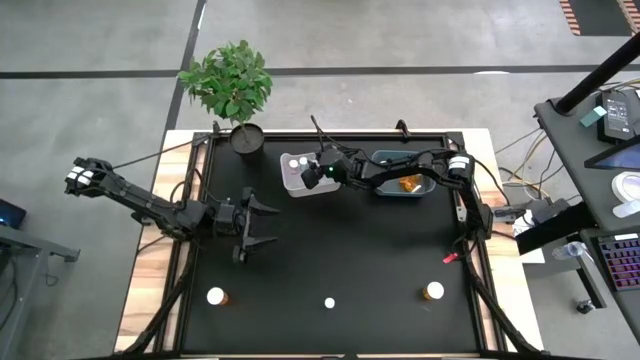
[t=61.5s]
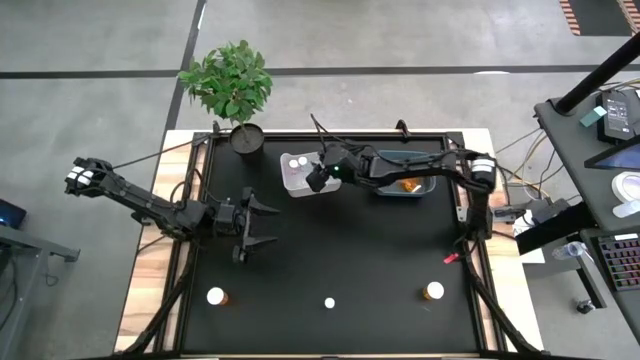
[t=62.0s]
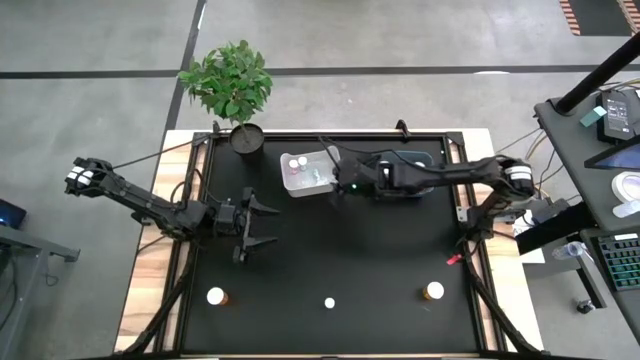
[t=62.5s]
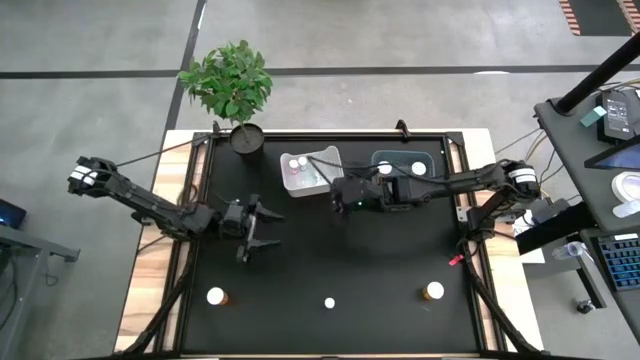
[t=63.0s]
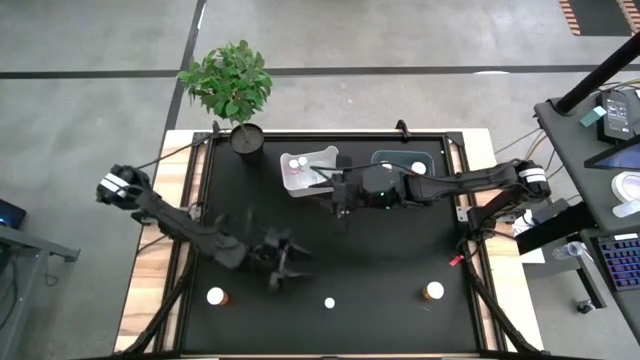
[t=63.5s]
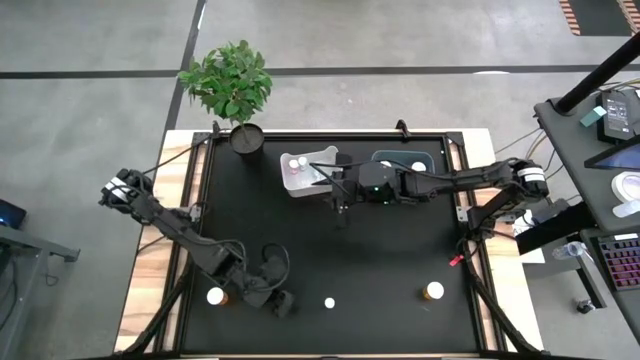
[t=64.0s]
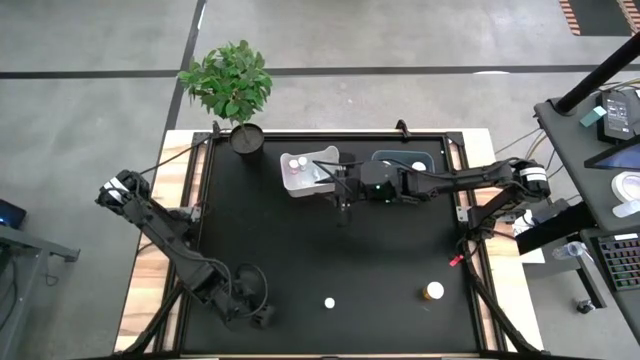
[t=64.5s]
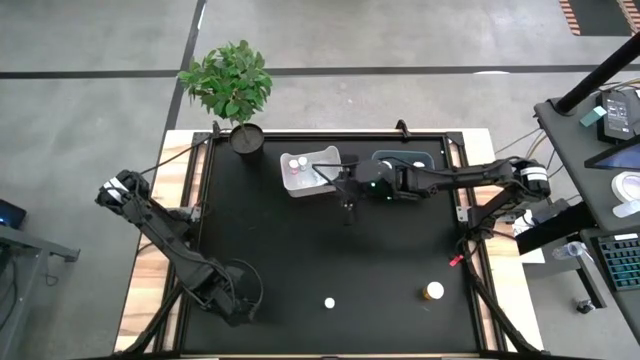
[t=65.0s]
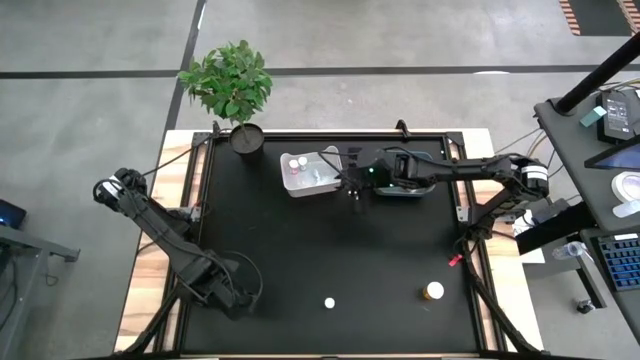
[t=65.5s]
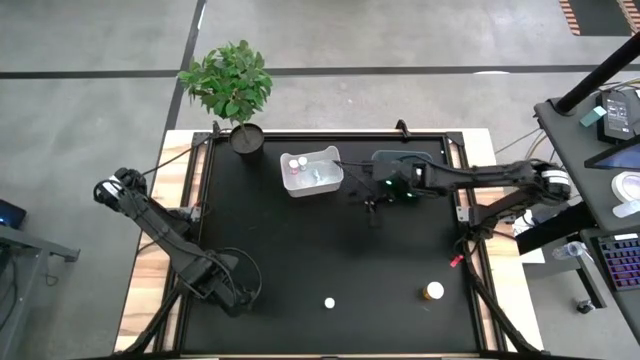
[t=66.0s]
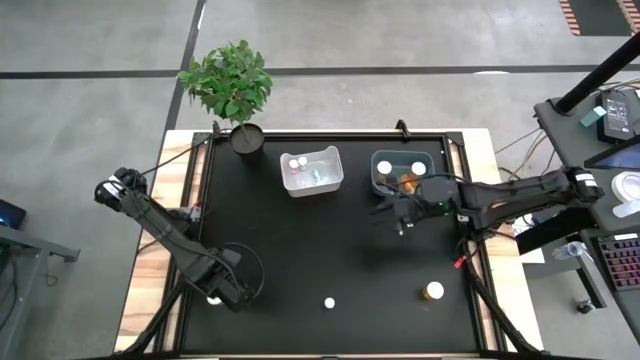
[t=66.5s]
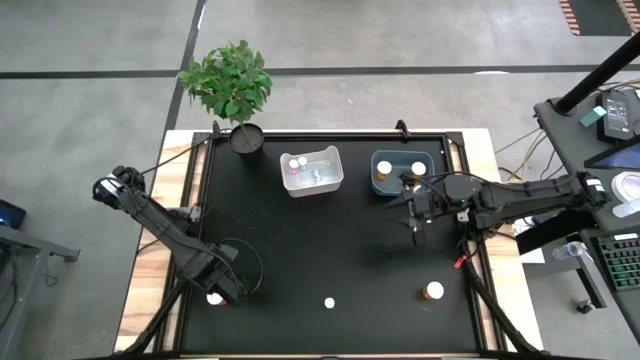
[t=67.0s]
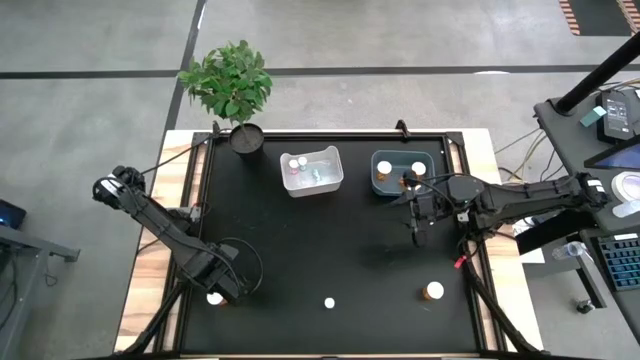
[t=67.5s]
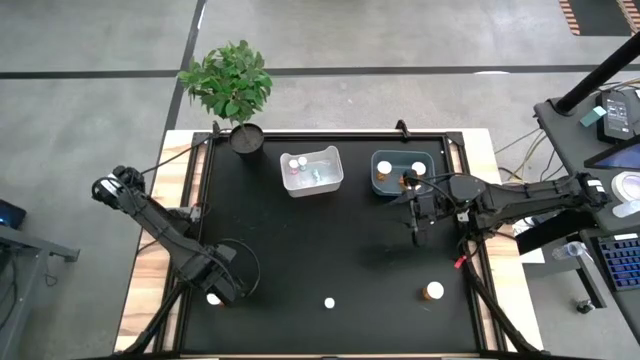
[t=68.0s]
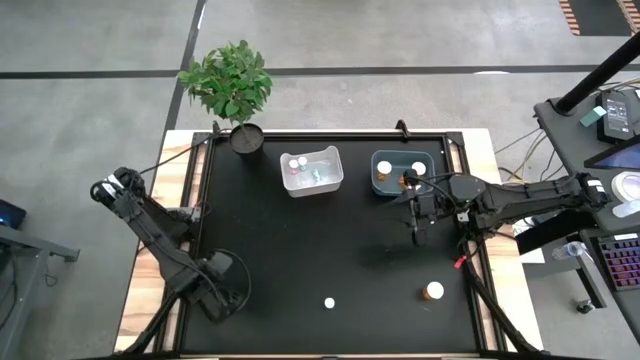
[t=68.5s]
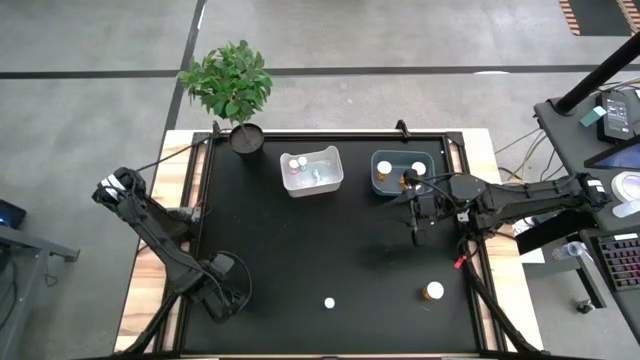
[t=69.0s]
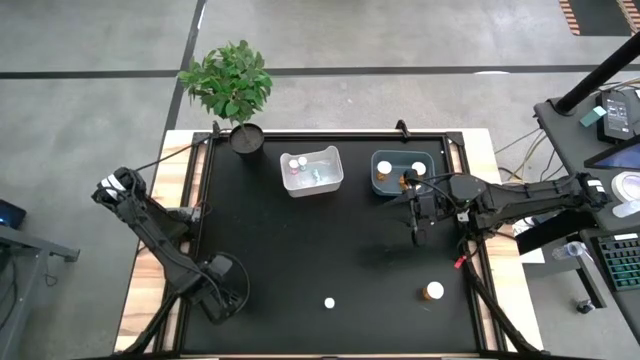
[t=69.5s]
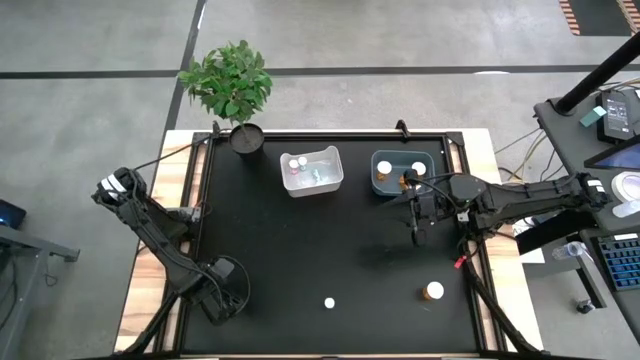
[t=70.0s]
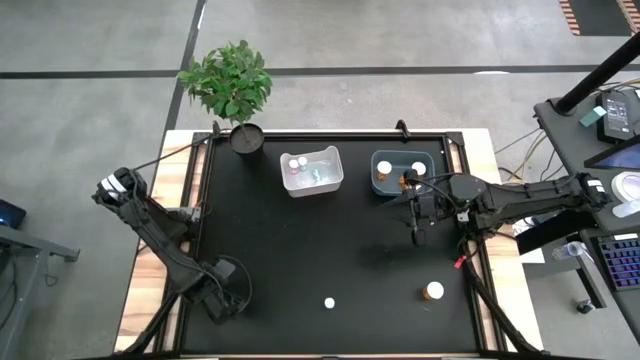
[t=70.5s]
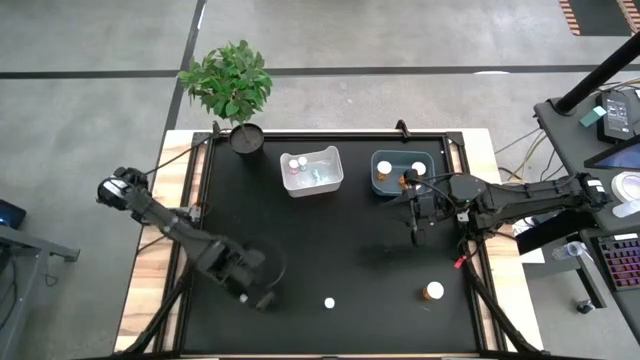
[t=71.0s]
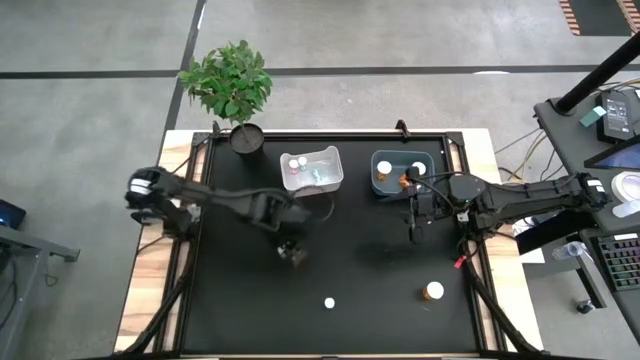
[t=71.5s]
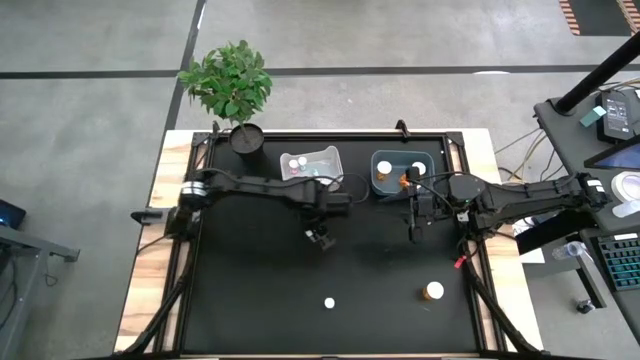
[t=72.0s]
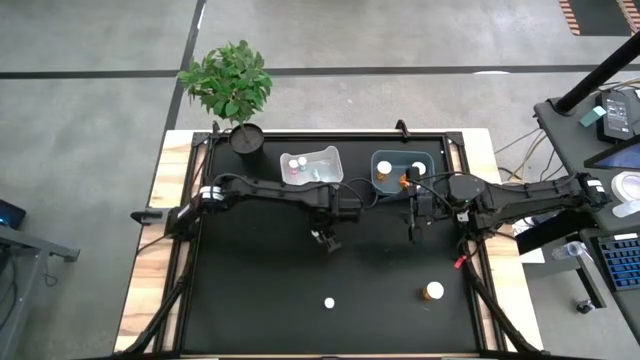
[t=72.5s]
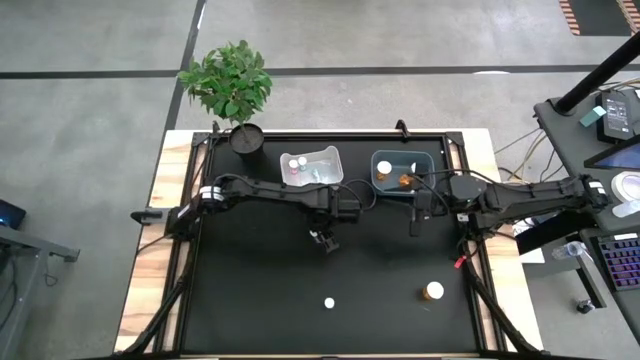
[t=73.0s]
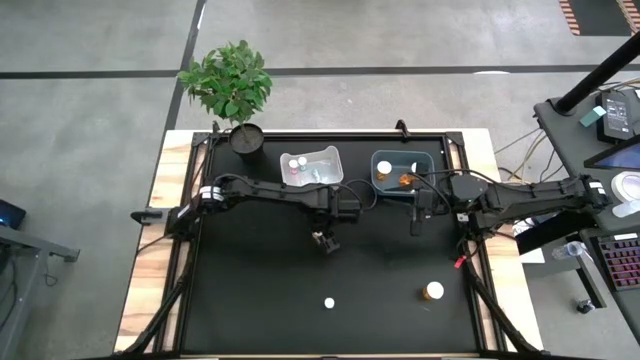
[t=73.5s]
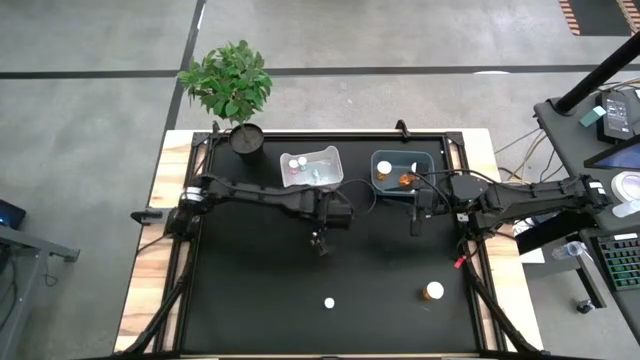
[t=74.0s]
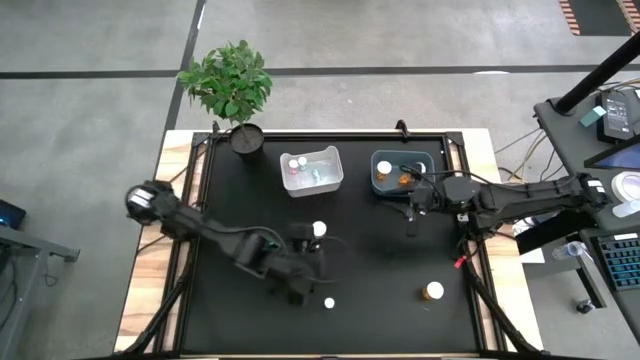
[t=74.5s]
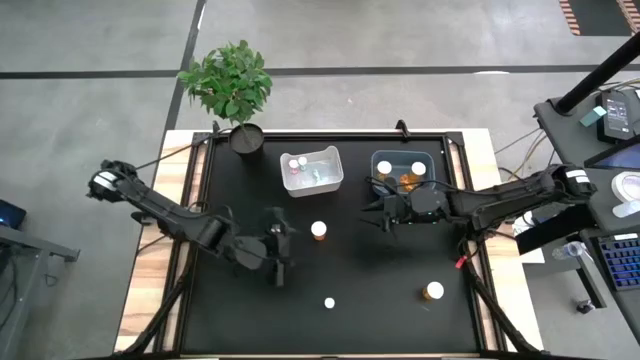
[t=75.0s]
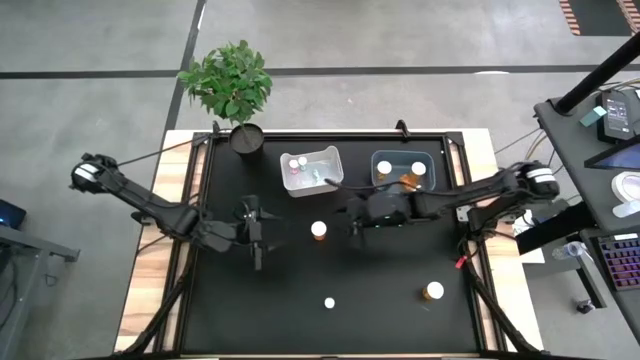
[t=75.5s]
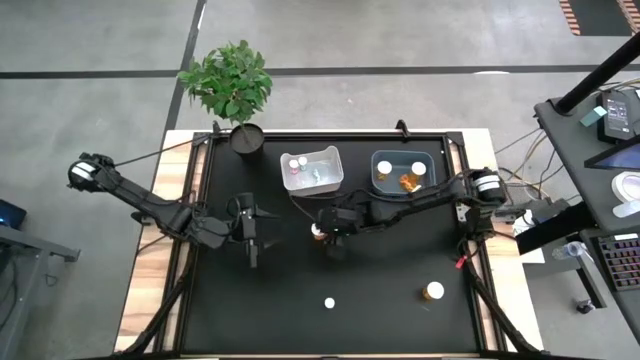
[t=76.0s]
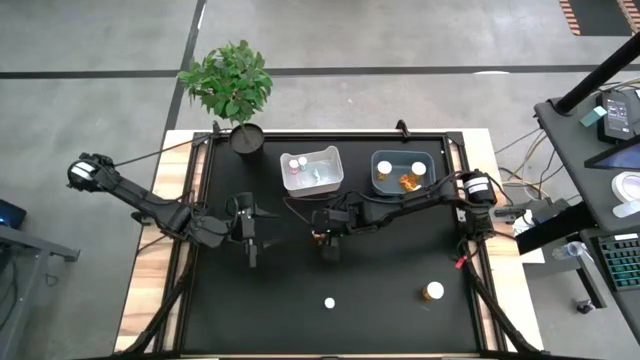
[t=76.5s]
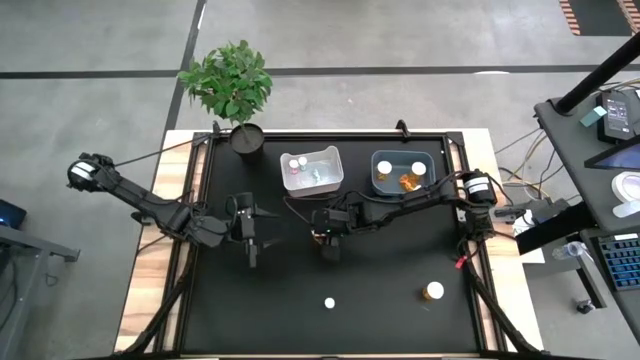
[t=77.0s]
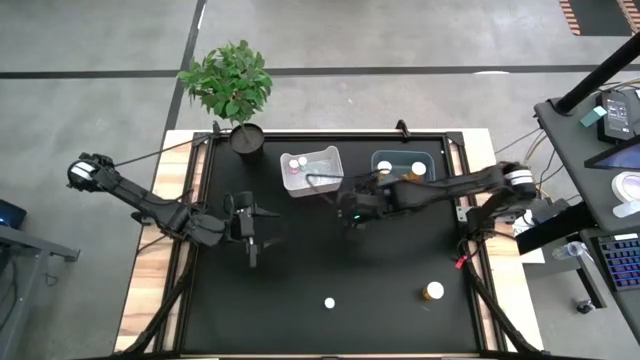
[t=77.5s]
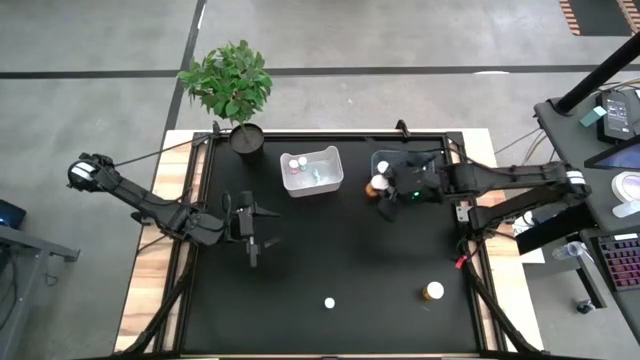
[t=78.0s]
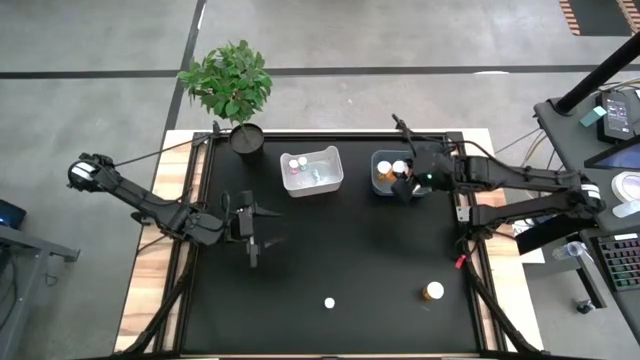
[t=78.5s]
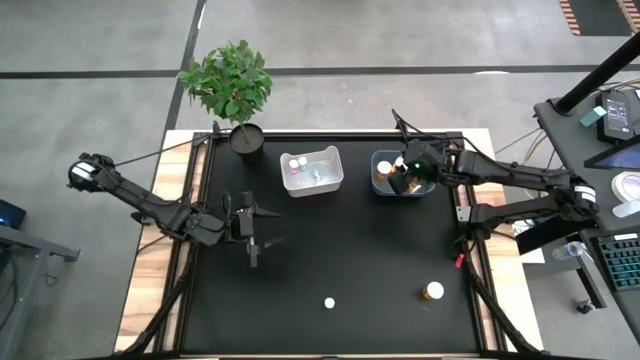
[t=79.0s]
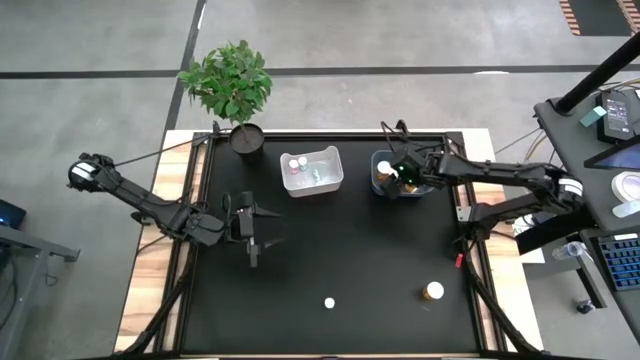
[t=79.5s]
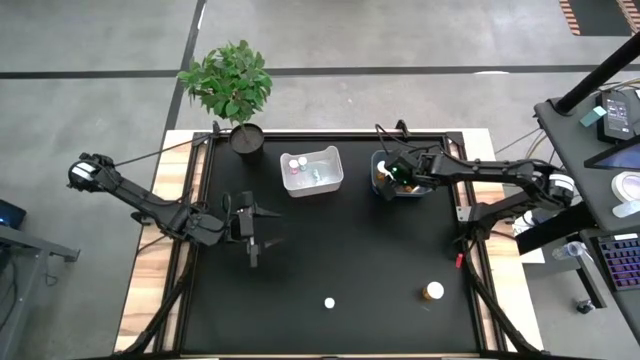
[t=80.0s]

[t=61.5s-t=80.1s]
Task: Pick and place medicine bottles into bin by pill shape (circle, oval)
Put the orange capsule bottle into the blue bin

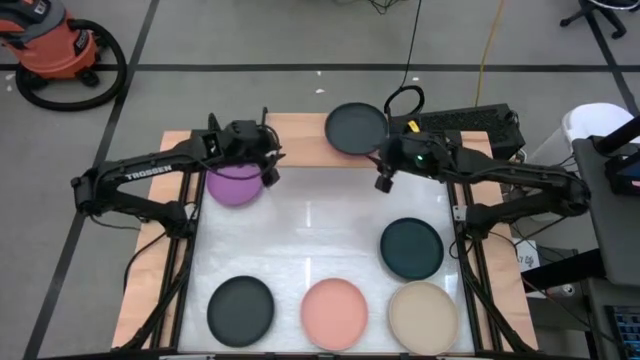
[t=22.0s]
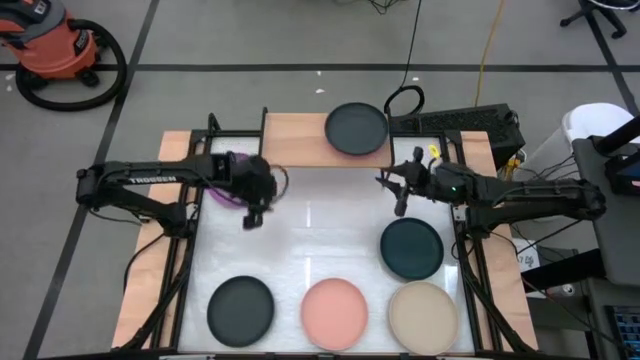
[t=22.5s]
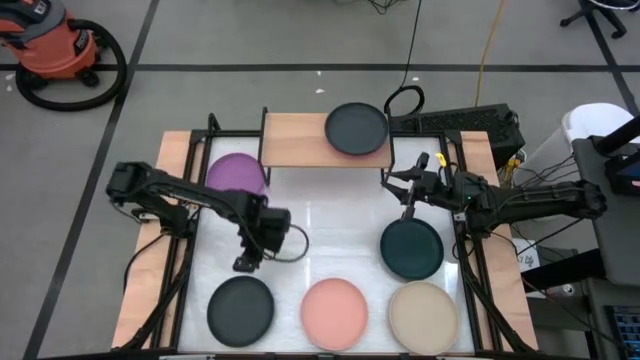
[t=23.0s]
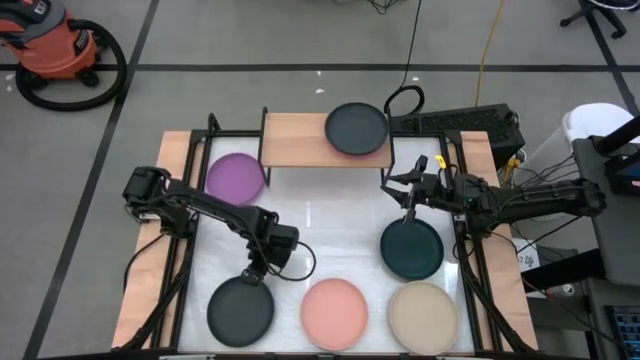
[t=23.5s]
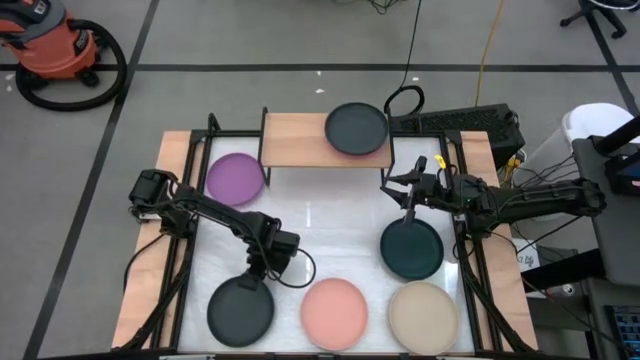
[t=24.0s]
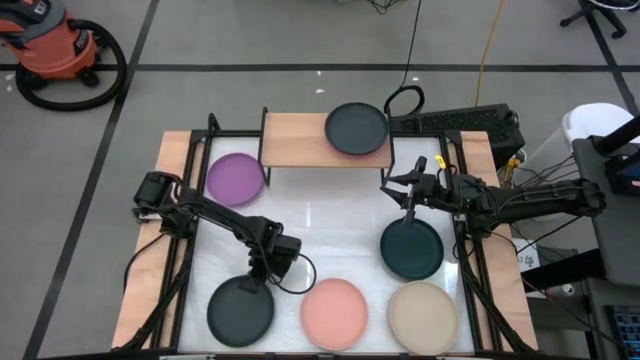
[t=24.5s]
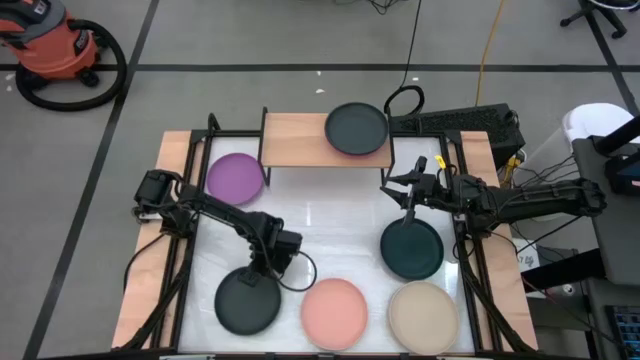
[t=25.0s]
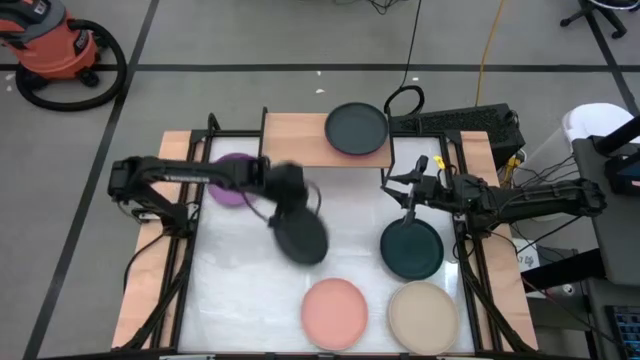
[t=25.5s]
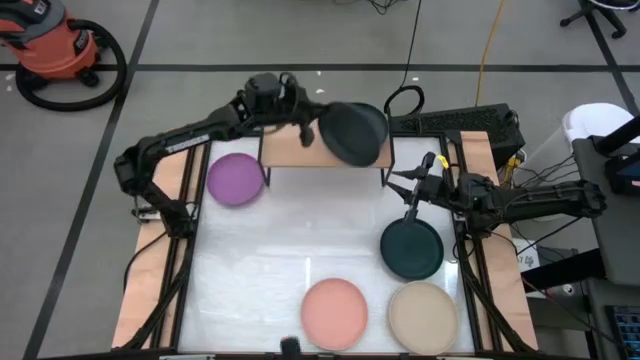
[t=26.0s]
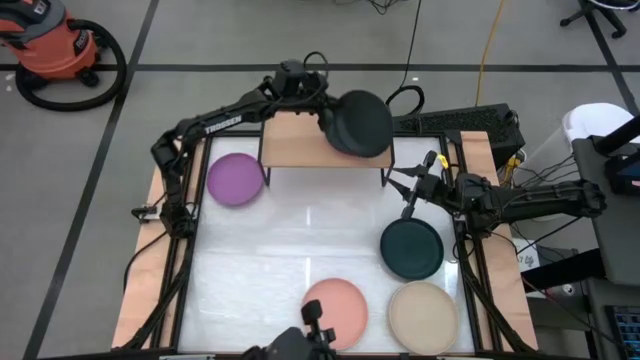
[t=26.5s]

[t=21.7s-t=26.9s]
Task: Place and stack plates onto a shelf
Stack the black plate on top of the black plate on the shelf
